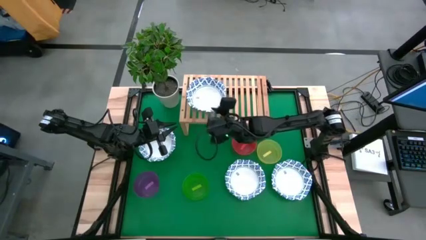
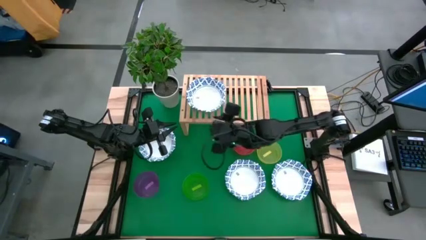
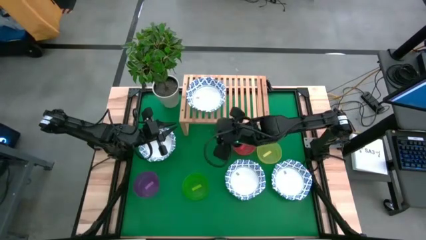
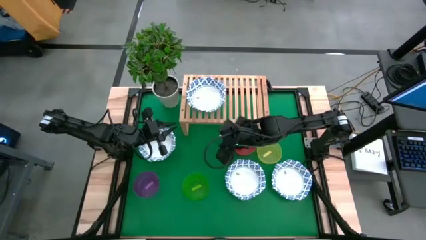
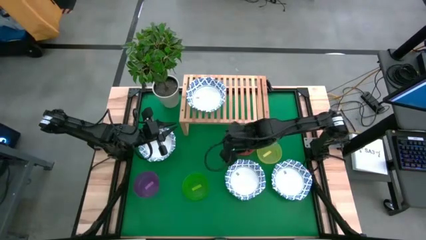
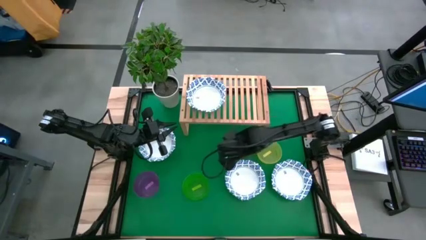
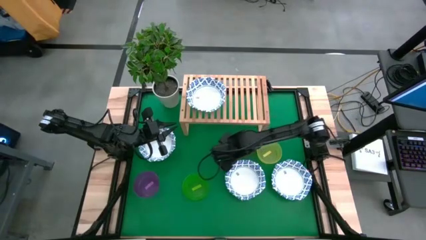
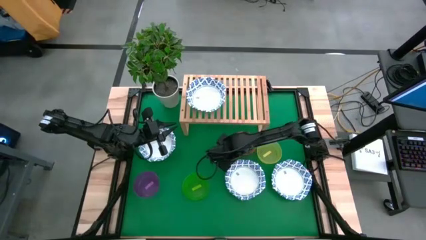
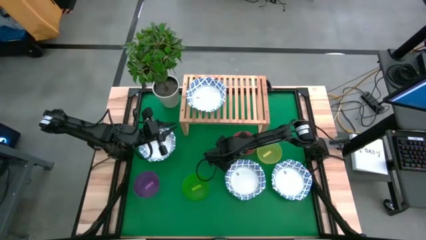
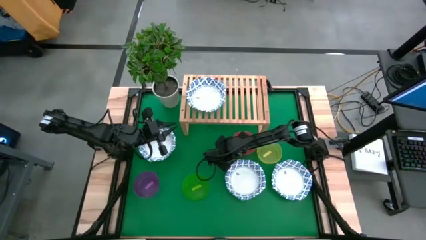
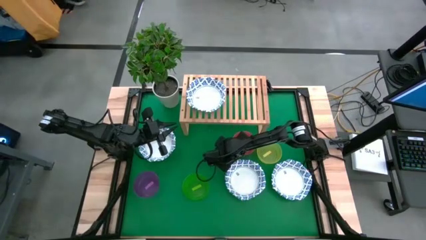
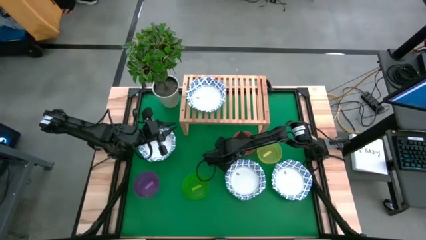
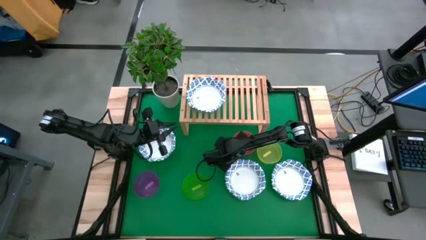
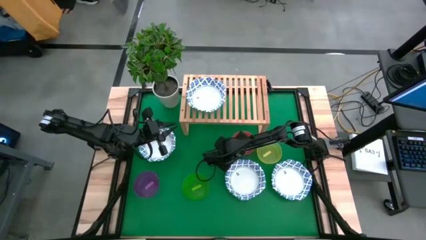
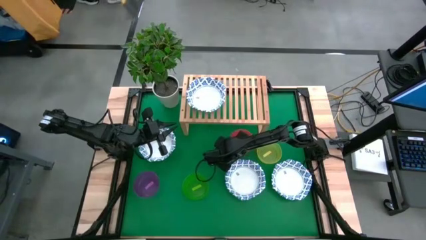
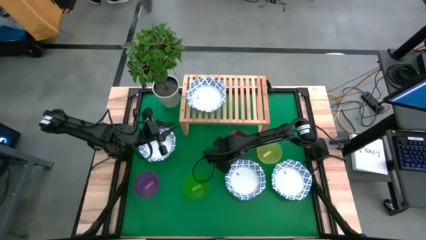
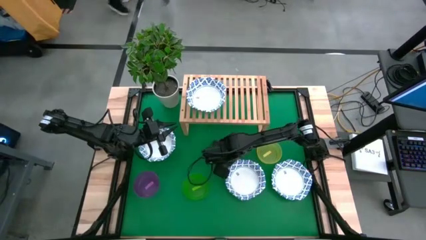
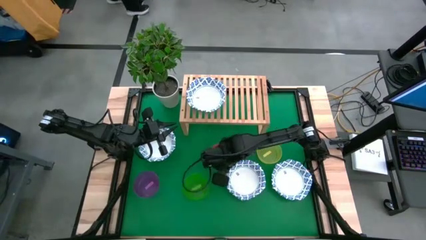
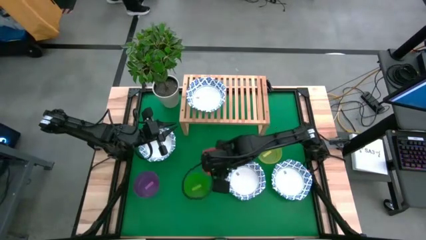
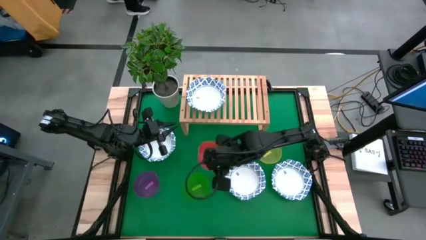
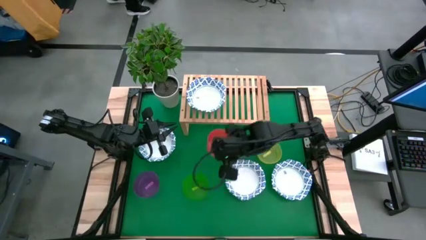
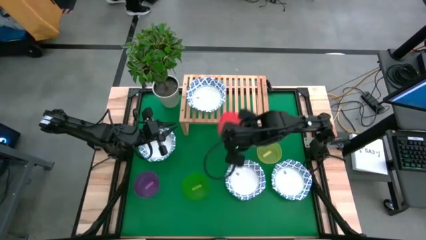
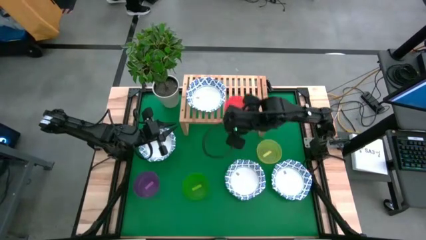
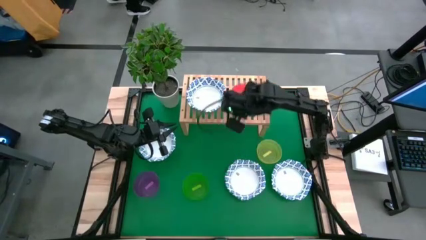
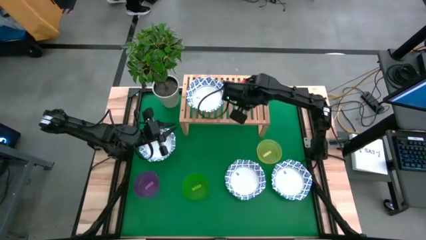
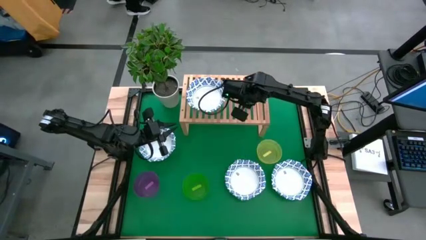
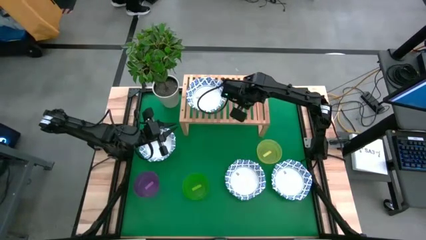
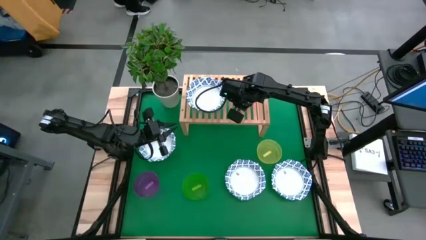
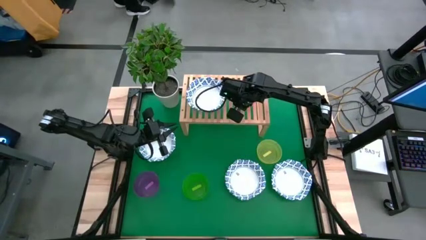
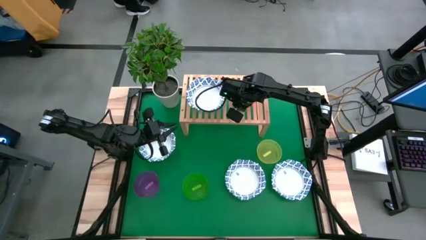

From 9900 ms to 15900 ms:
Task: Place and stack bowls onto a shelf
Put the orange bowl on the shelf

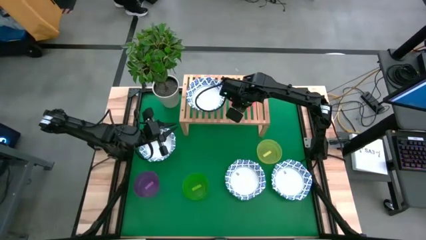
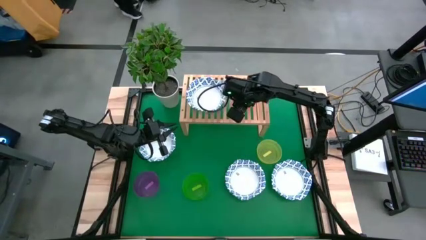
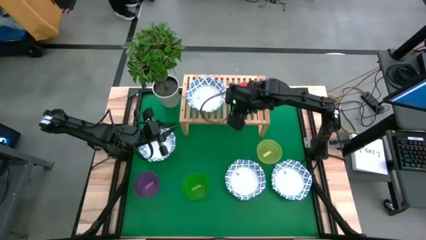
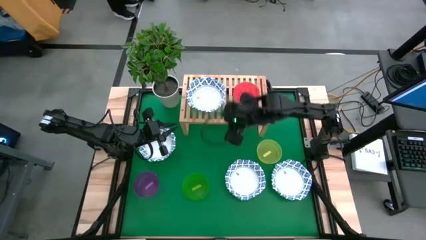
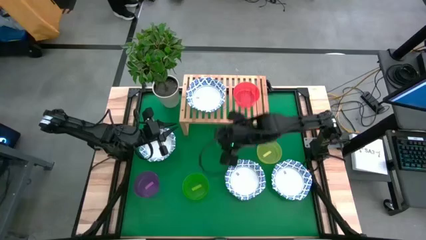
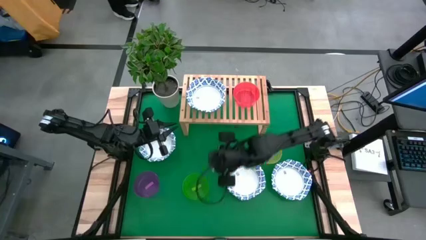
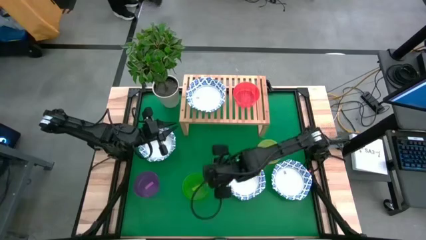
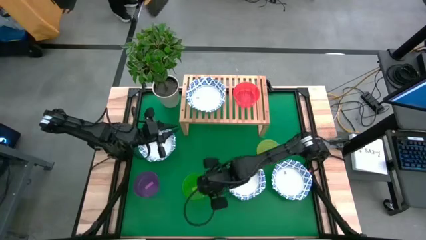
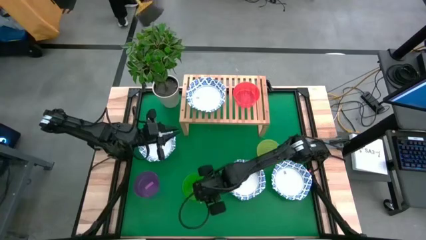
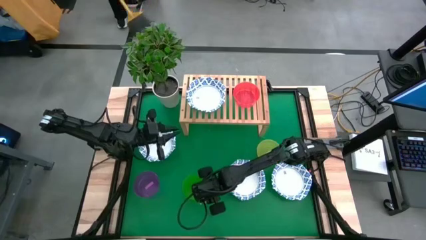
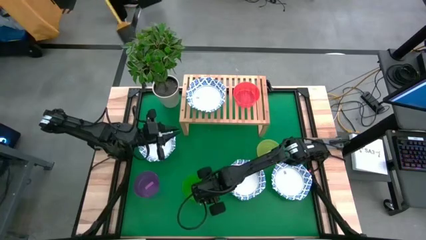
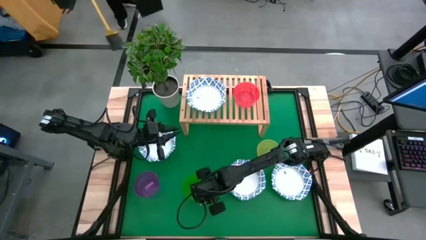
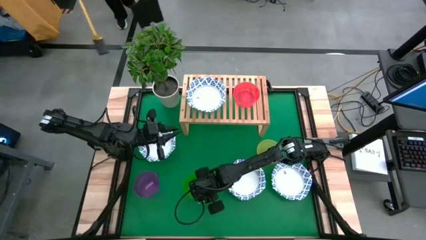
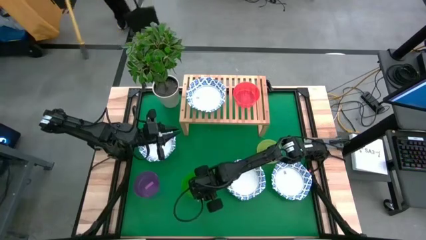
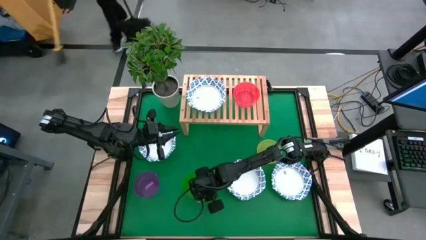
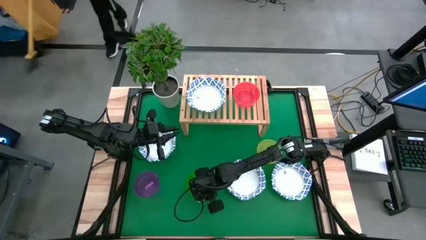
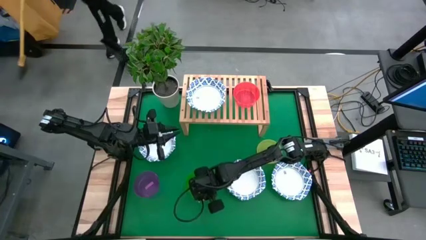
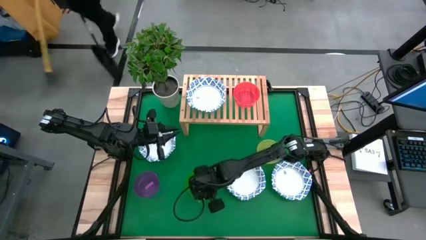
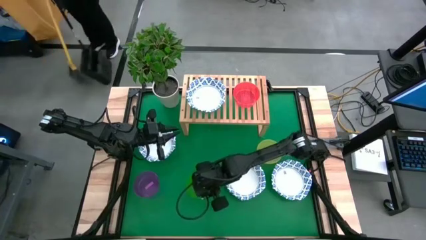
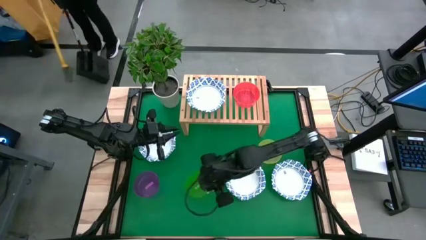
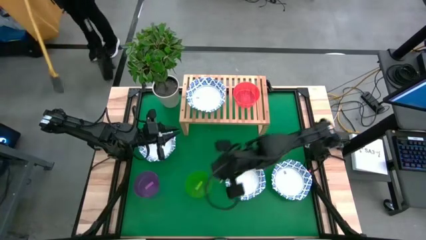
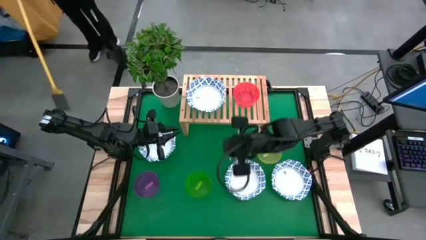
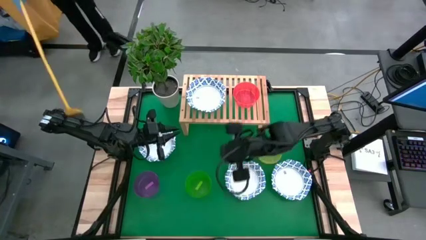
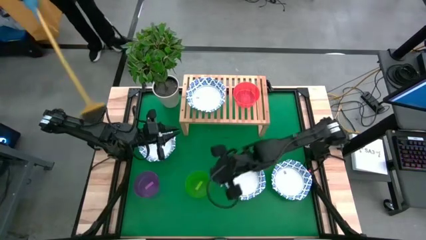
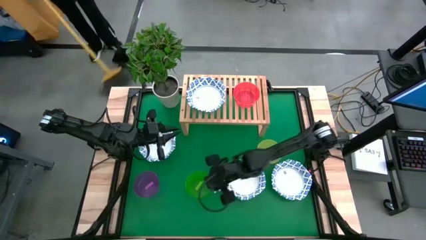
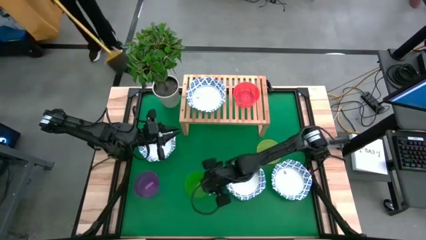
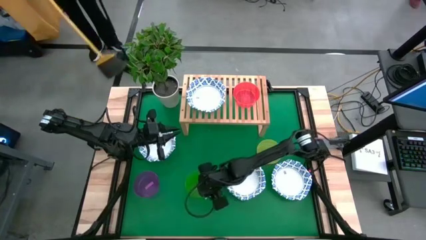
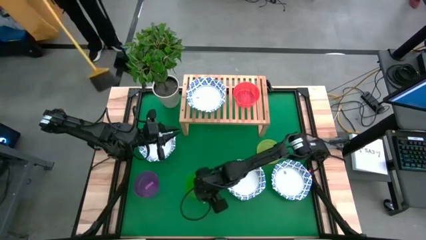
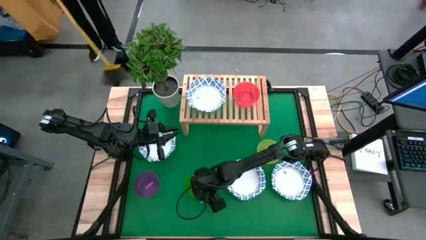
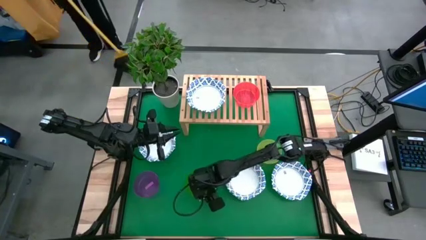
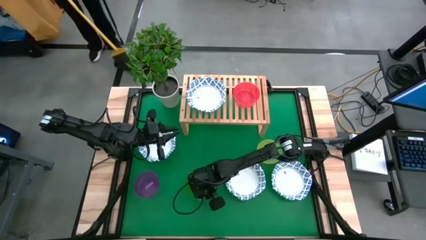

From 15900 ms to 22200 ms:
Stack the green bowl on top of the orange bowl

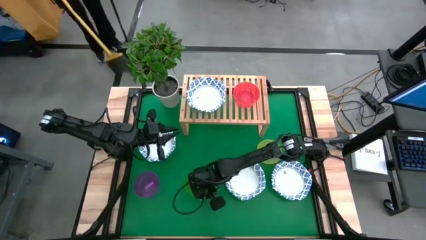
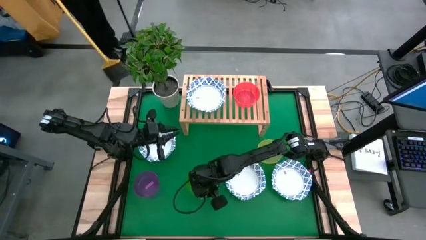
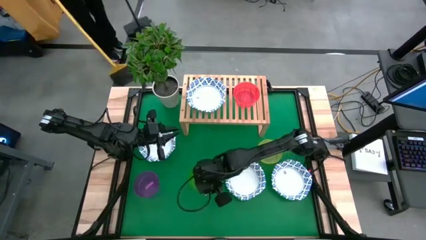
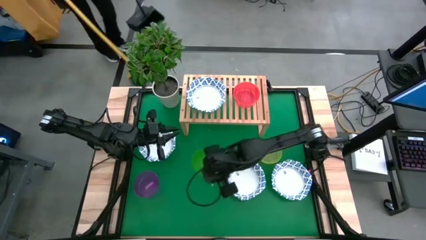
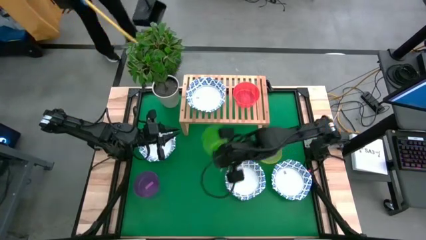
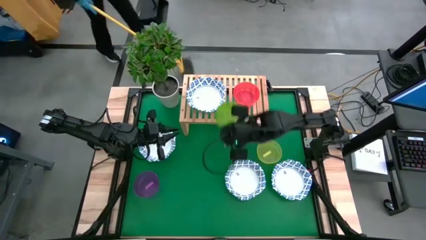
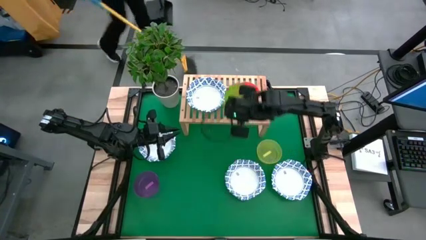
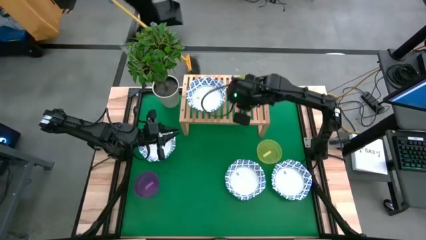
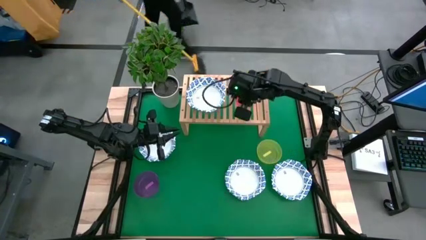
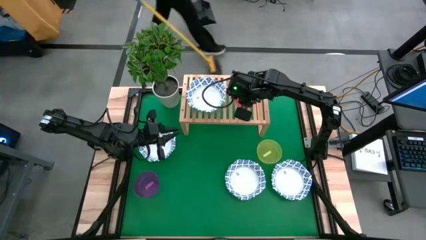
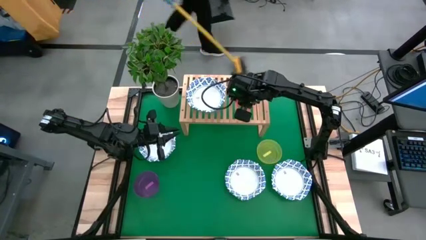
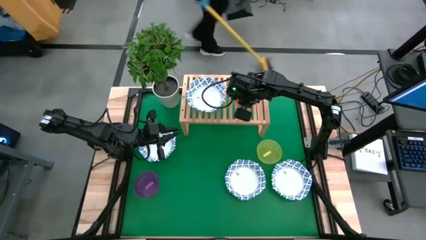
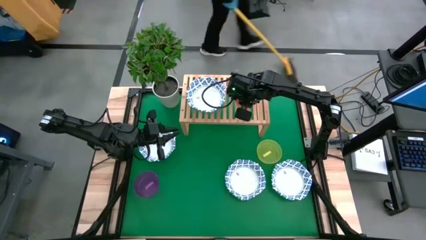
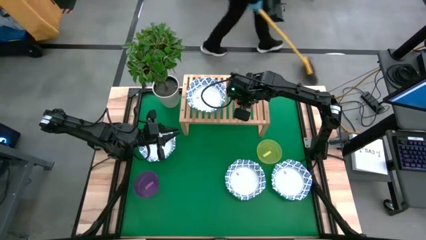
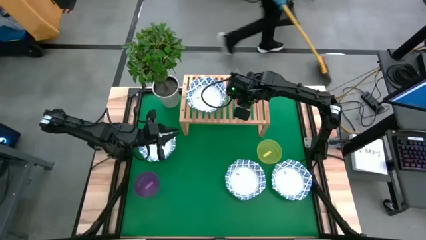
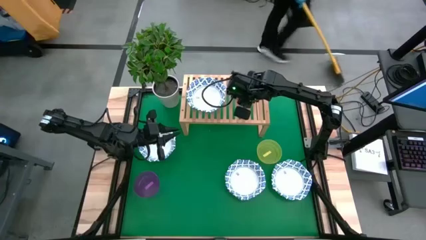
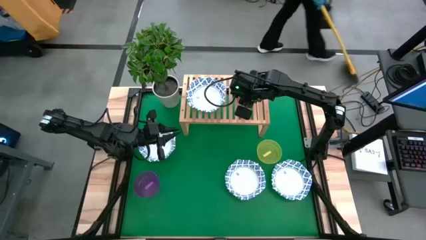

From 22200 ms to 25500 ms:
Stack the green bowl on top of the orange bowl
